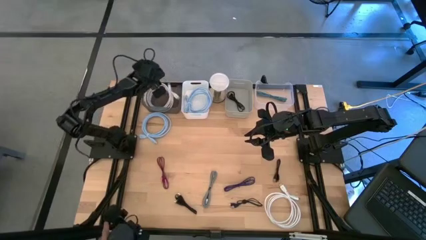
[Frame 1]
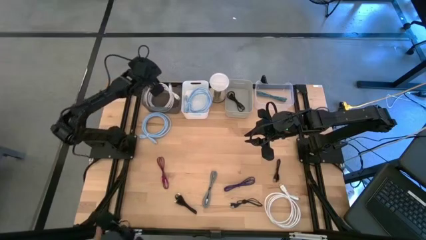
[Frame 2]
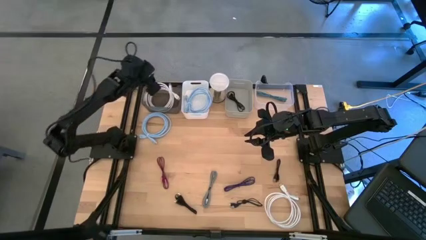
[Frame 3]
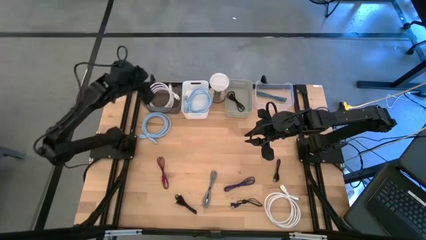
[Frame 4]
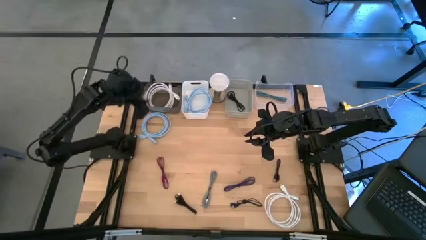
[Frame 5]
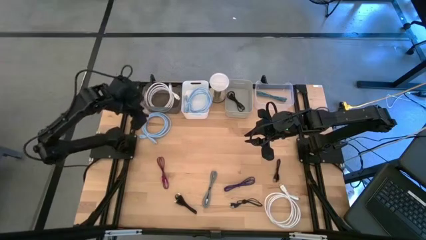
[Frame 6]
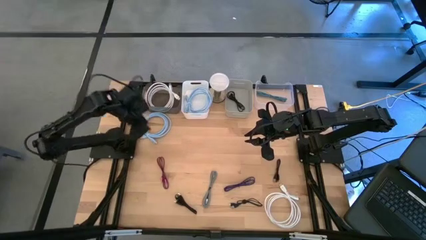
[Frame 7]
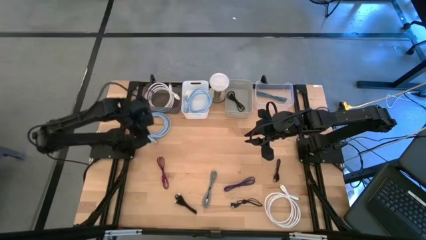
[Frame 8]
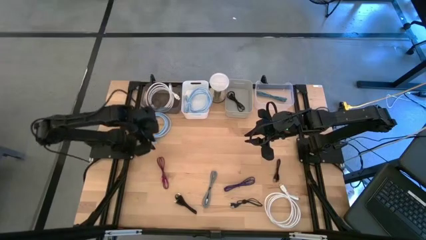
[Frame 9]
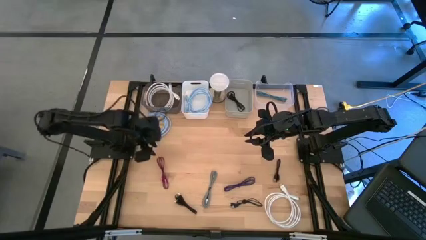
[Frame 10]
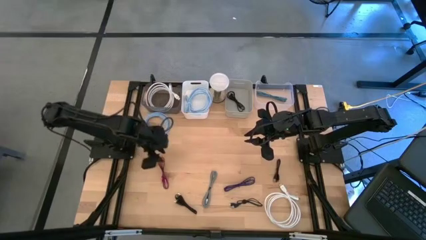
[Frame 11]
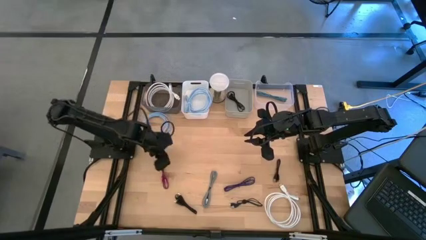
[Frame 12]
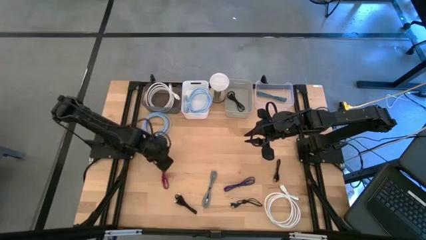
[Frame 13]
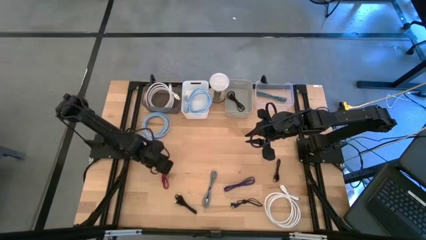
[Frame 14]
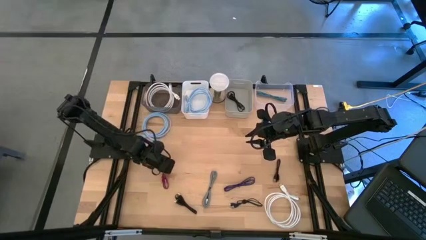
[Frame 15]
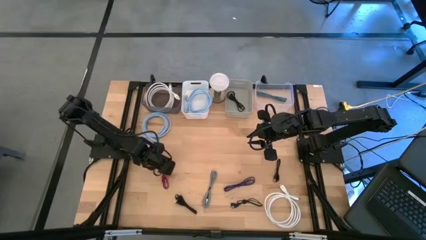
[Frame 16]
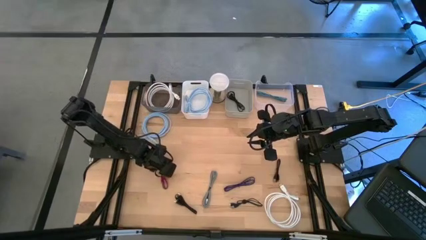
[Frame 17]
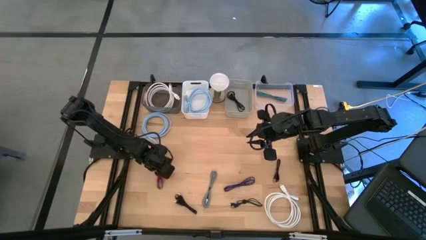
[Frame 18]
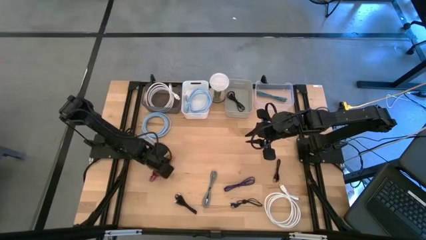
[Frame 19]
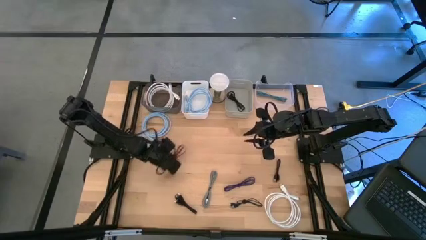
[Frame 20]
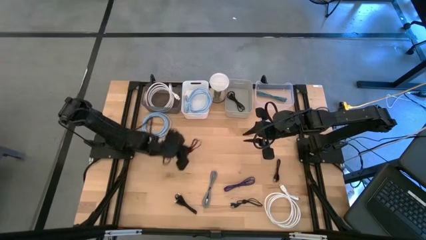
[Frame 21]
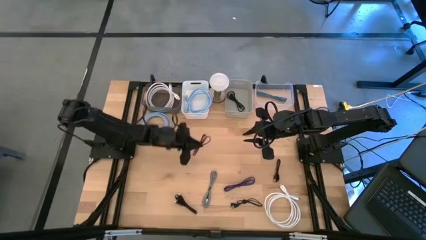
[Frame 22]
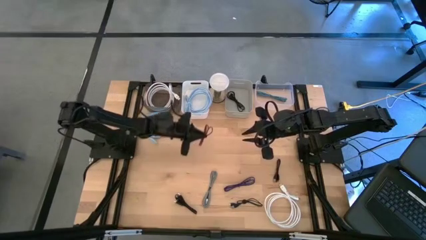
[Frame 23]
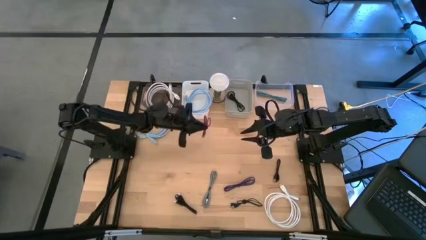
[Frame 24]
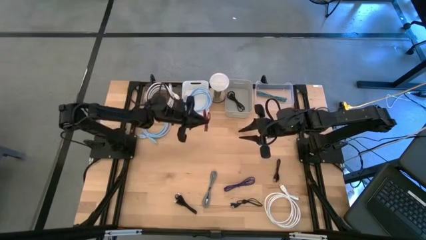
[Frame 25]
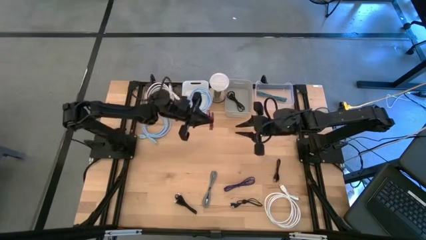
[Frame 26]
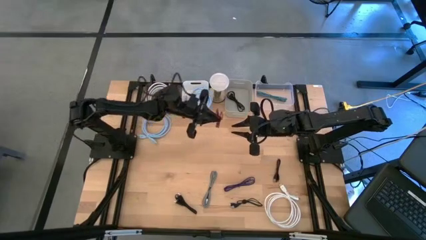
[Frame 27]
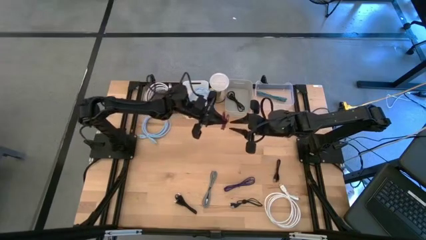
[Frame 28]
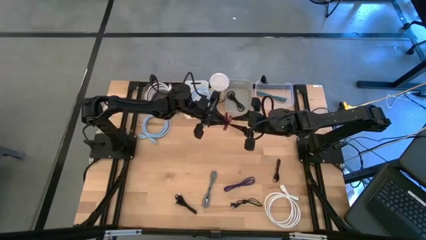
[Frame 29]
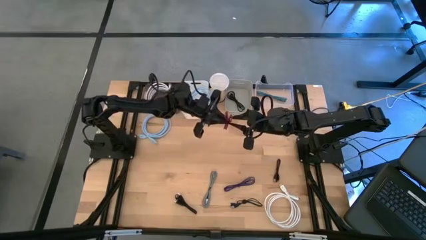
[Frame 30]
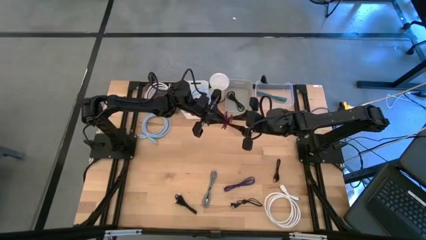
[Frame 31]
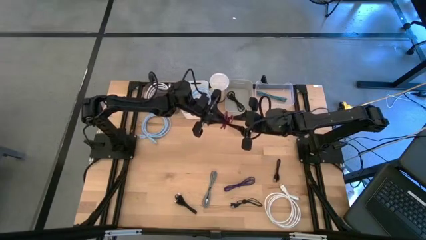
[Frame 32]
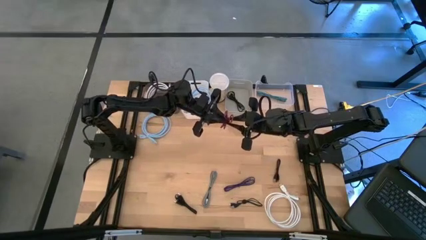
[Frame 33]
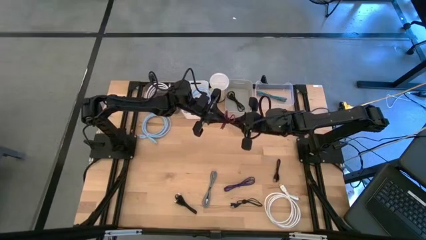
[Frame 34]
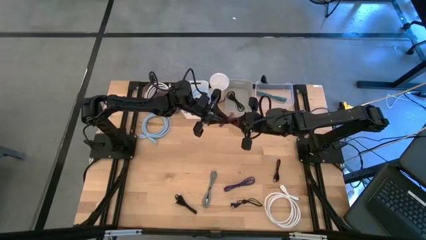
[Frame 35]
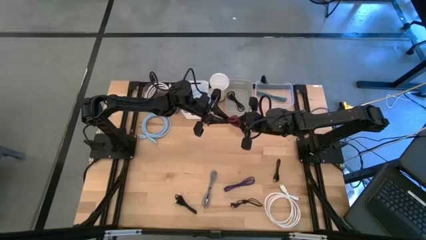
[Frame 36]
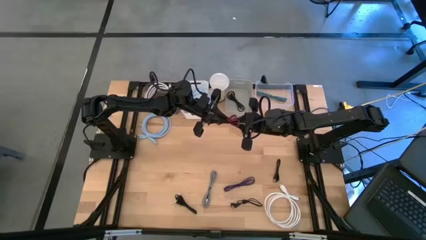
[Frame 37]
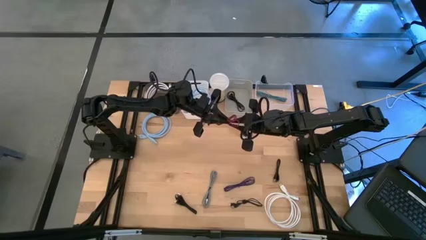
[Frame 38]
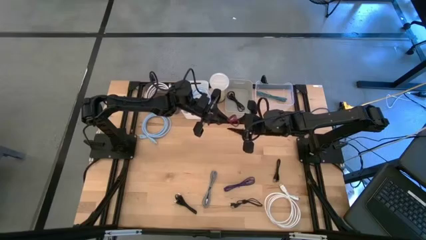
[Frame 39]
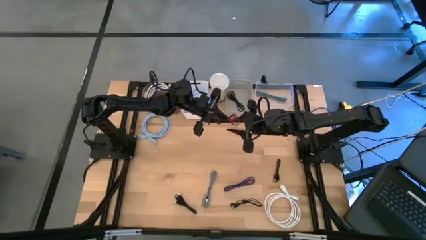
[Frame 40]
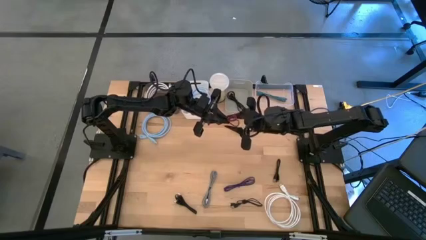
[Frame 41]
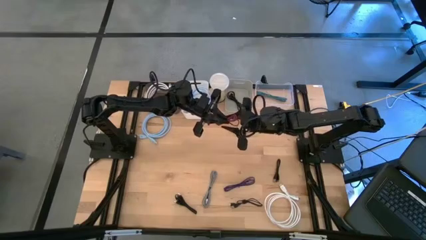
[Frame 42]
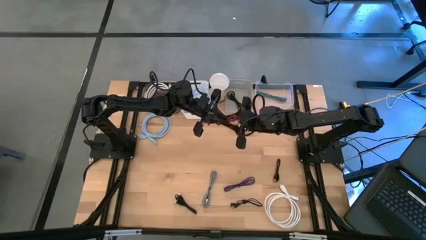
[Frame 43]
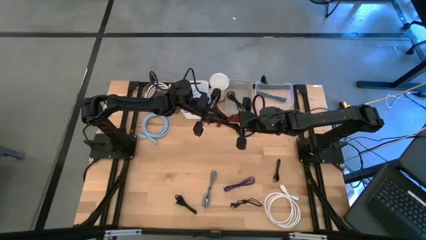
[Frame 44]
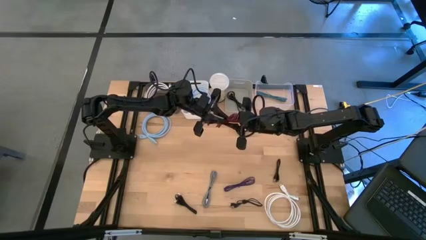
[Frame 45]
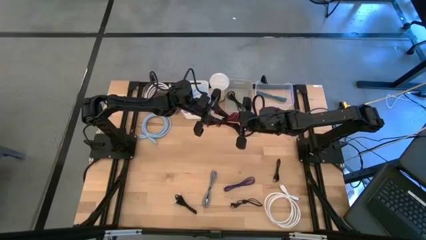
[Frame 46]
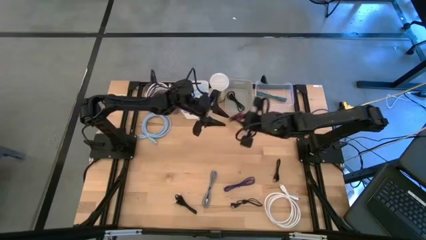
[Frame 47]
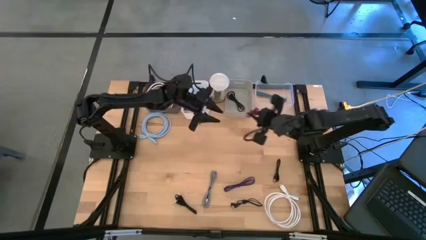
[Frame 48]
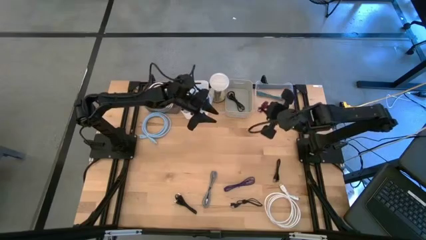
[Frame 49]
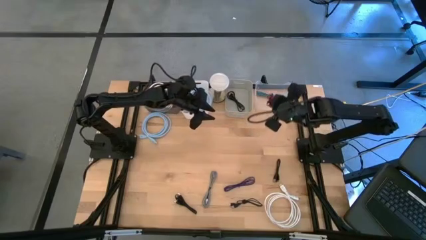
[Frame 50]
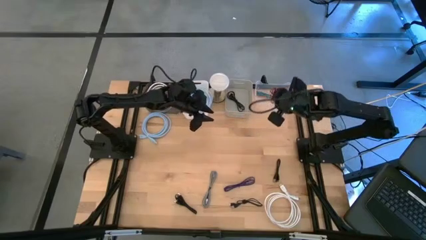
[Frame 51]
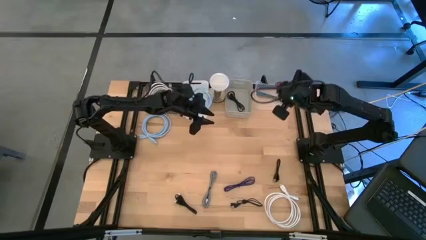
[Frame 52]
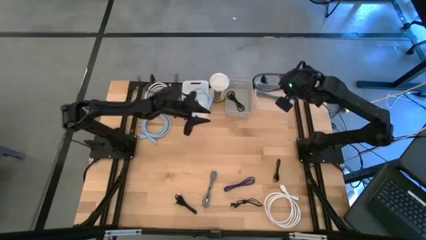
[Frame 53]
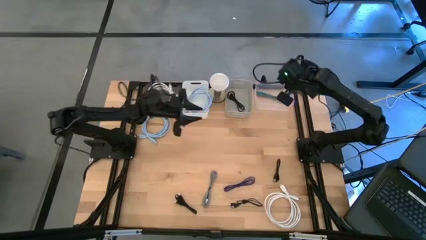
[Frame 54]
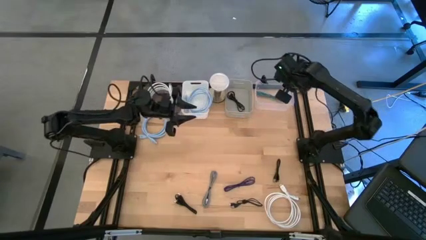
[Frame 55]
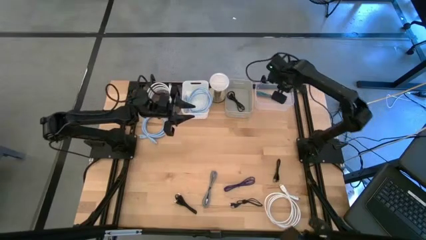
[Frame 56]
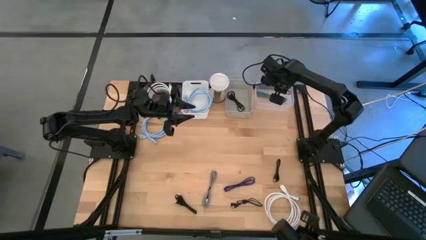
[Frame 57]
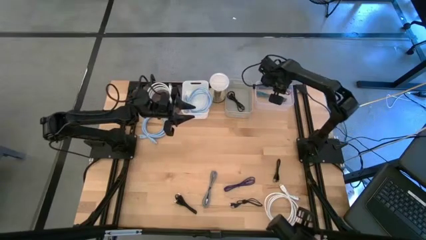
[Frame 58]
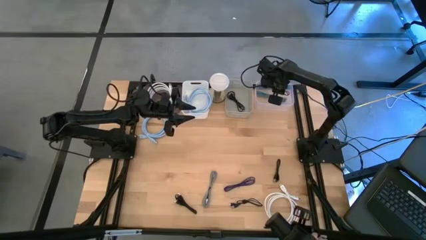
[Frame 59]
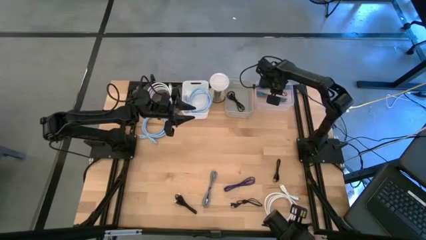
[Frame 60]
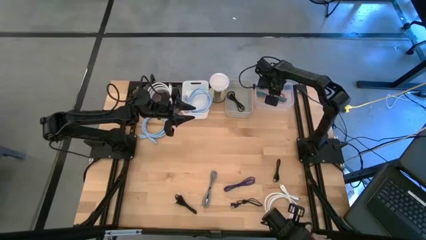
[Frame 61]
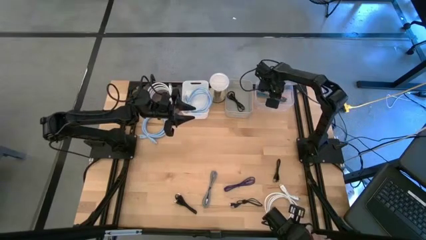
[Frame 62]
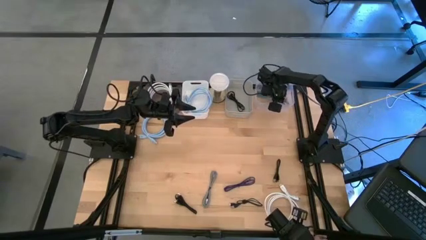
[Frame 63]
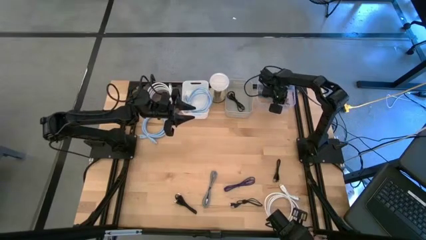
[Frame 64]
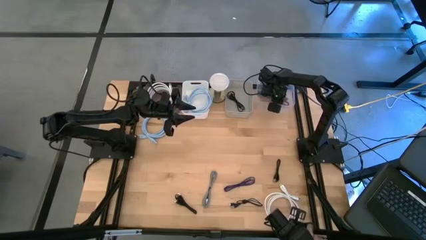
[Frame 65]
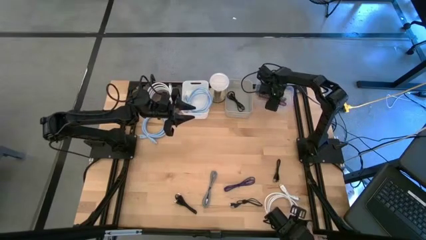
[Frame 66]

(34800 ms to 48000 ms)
Task: Pick & Place USB Port
Put the red charger cable into the transparent bin

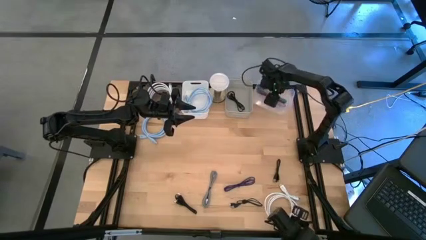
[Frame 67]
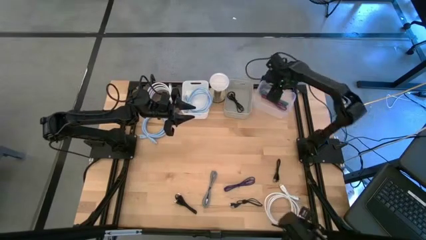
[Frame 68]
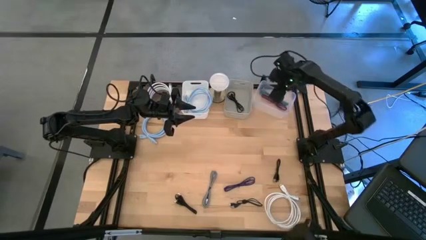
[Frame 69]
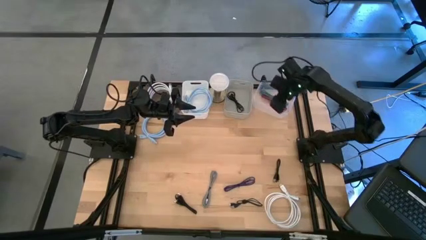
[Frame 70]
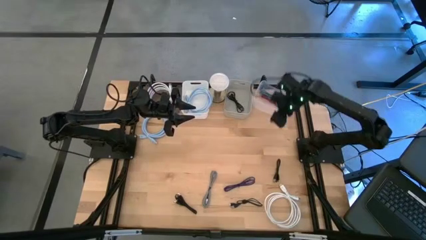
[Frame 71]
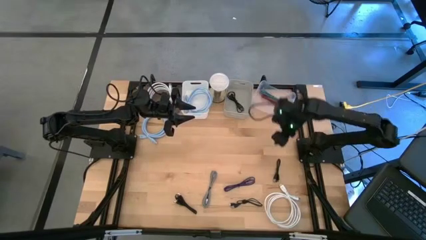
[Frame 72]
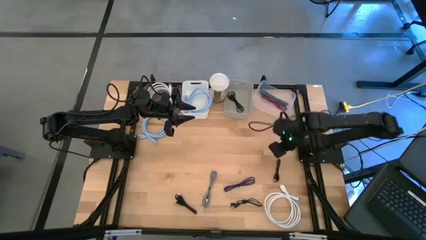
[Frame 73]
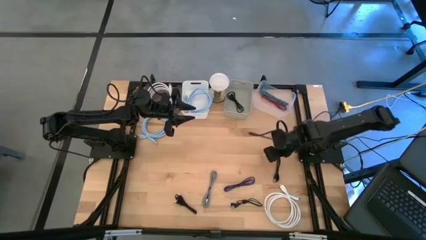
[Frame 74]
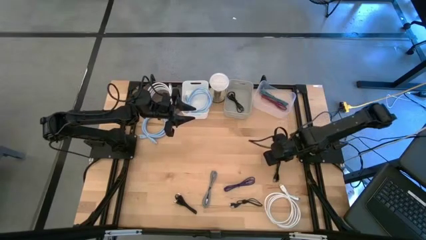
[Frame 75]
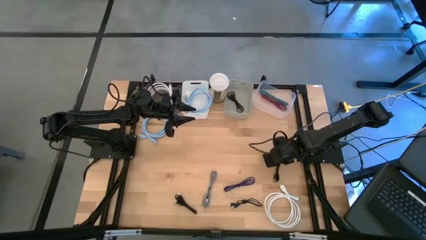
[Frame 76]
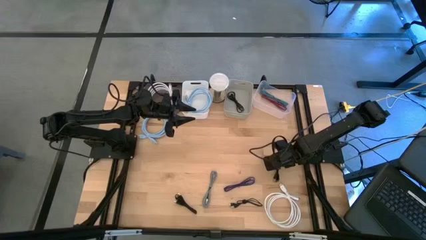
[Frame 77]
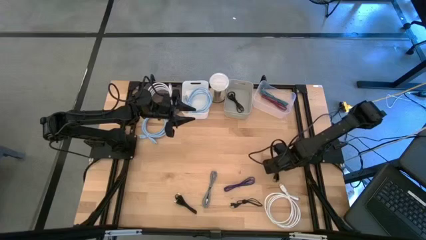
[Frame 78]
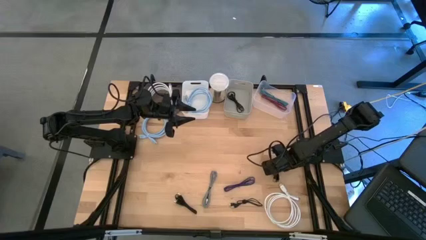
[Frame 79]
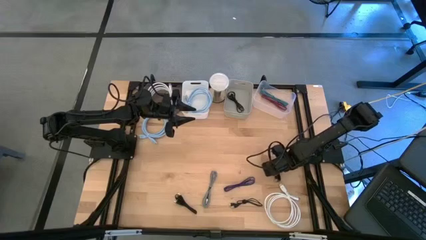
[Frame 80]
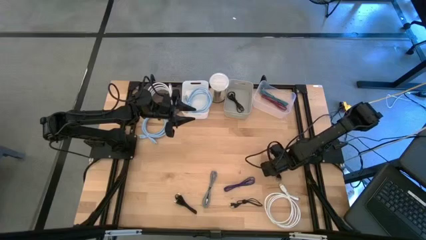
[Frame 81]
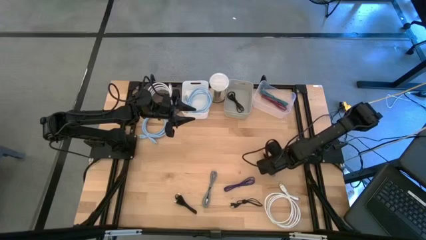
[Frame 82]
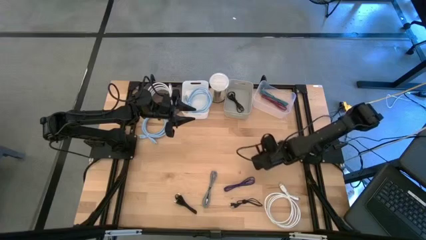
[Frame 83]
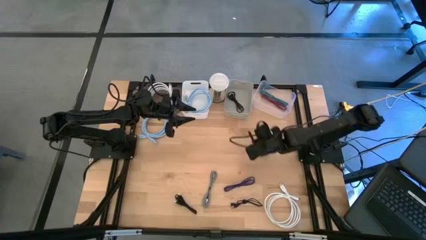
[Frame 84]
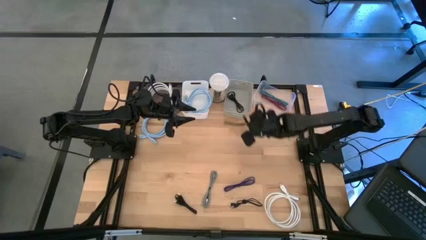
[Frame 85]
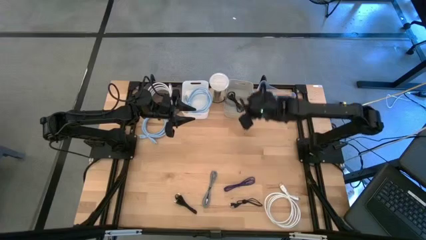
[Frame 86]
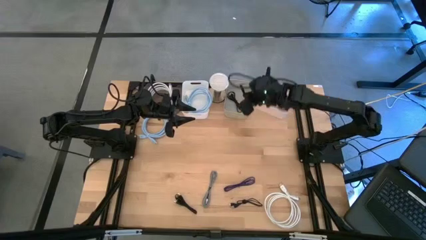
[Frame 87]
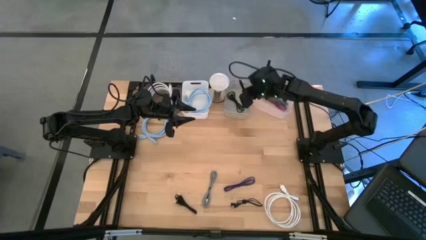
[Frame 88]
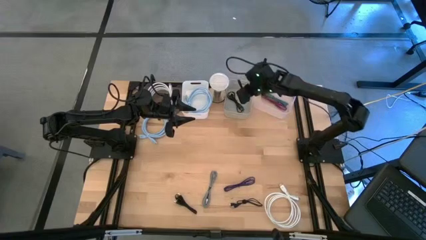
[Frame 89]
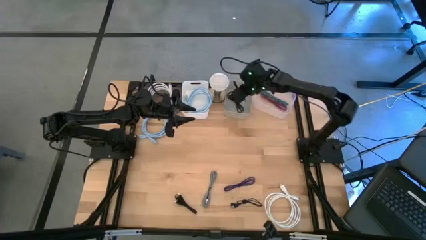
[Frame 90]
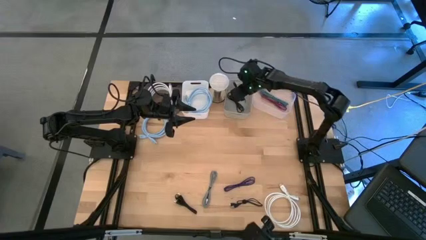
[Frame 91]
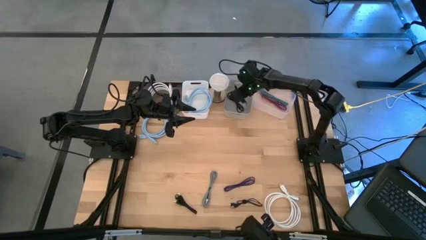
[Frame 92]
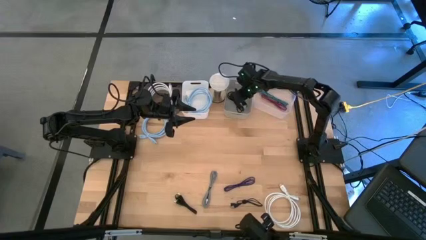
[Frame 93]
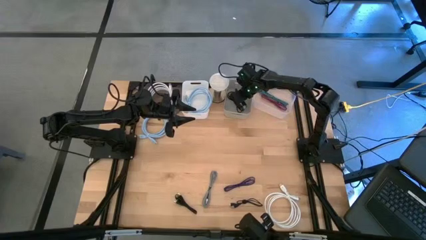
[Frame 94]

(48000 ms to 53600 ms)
Put the black charger cable into the gray bin
